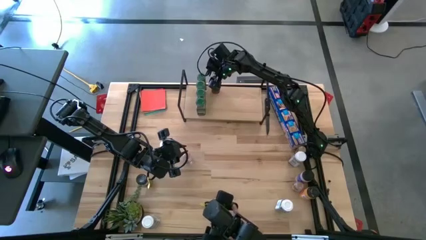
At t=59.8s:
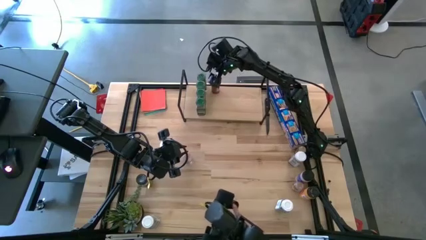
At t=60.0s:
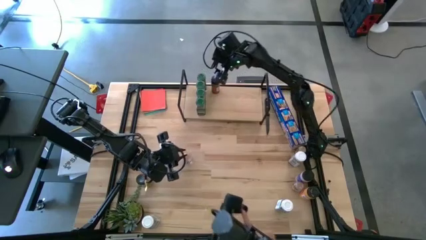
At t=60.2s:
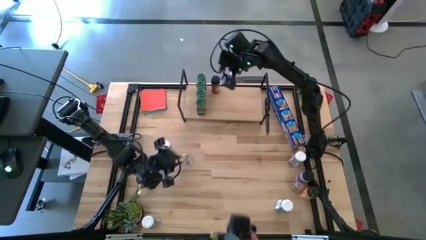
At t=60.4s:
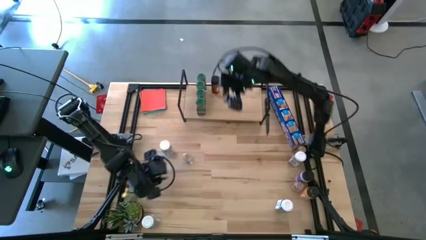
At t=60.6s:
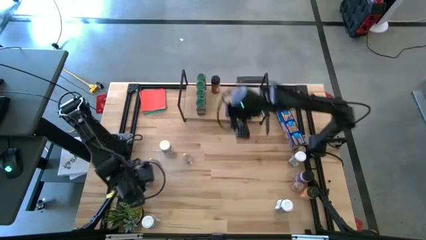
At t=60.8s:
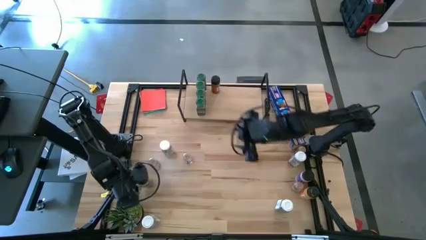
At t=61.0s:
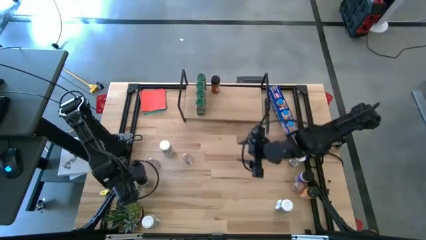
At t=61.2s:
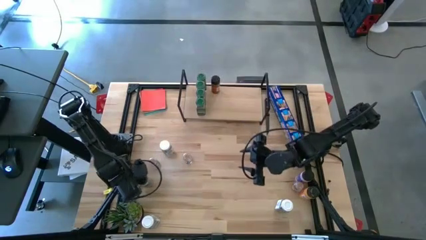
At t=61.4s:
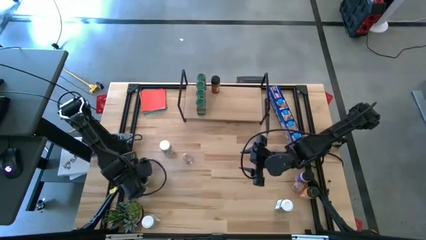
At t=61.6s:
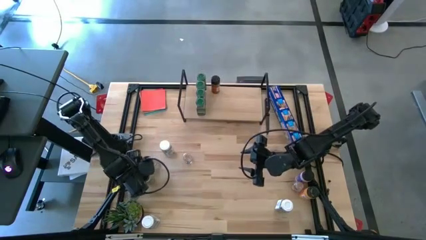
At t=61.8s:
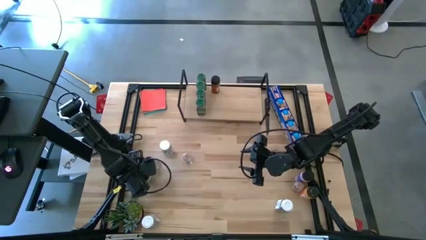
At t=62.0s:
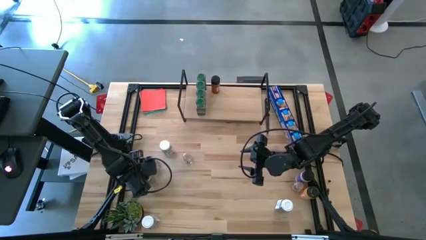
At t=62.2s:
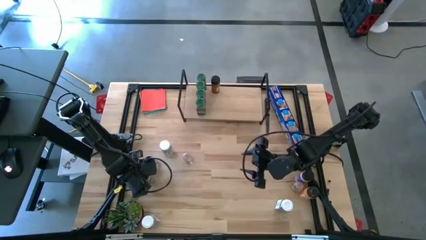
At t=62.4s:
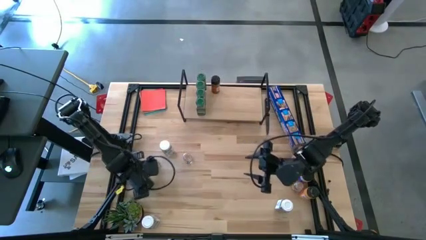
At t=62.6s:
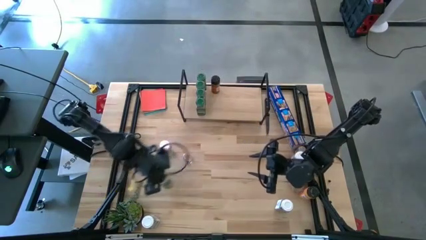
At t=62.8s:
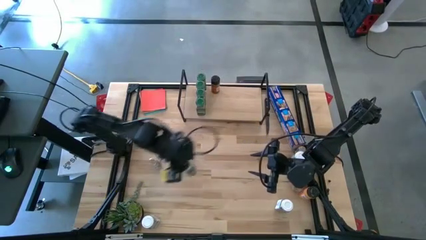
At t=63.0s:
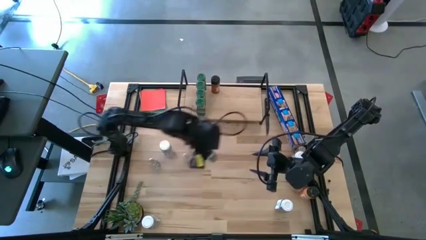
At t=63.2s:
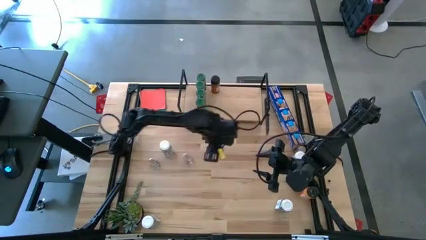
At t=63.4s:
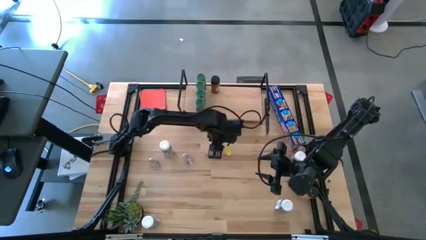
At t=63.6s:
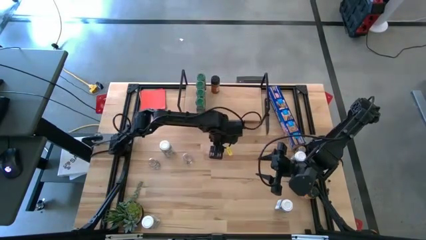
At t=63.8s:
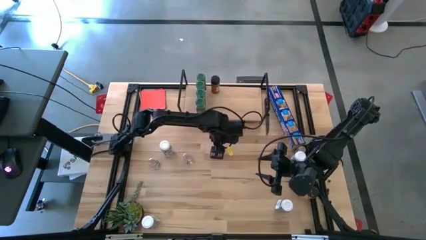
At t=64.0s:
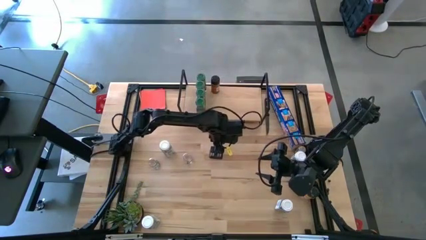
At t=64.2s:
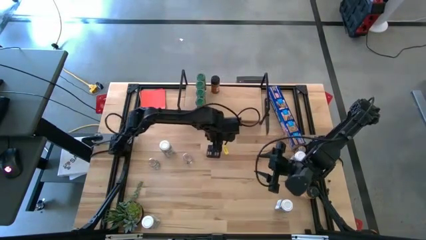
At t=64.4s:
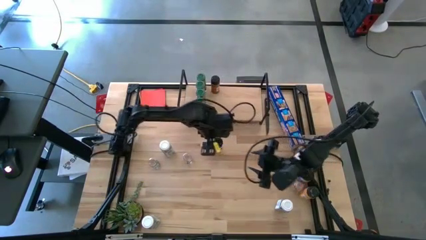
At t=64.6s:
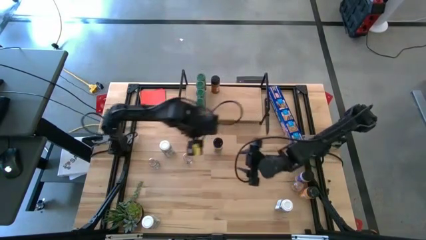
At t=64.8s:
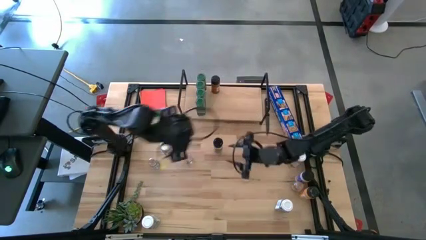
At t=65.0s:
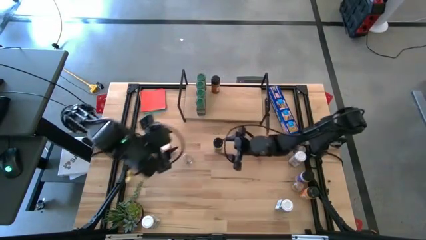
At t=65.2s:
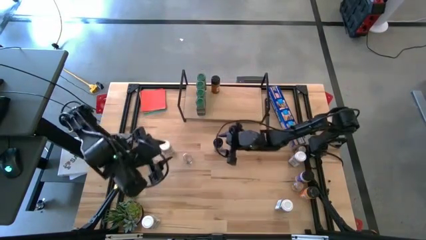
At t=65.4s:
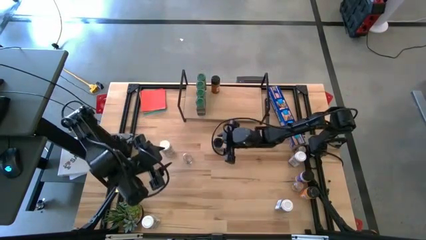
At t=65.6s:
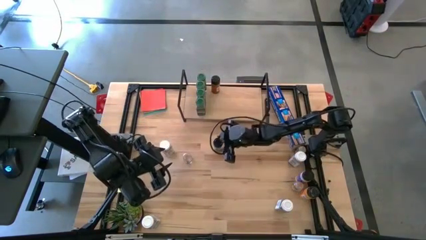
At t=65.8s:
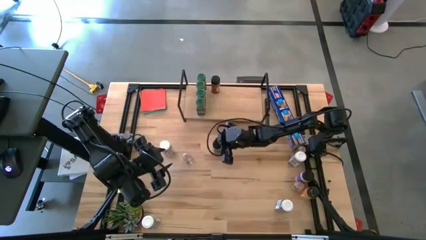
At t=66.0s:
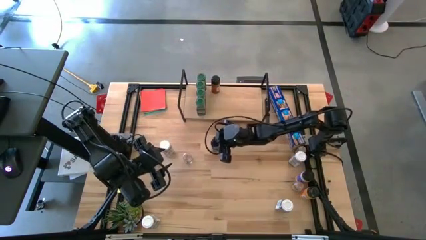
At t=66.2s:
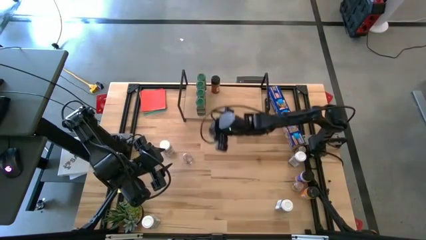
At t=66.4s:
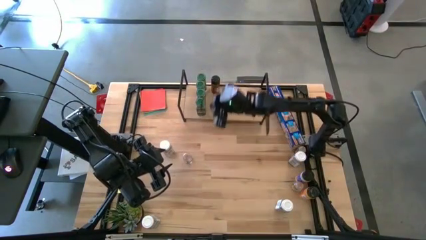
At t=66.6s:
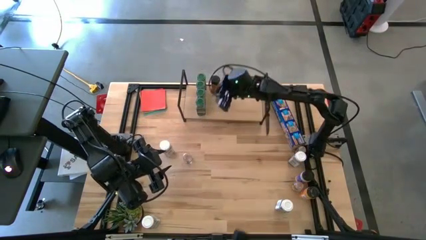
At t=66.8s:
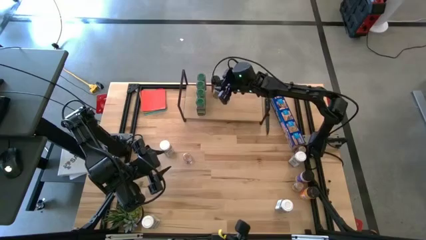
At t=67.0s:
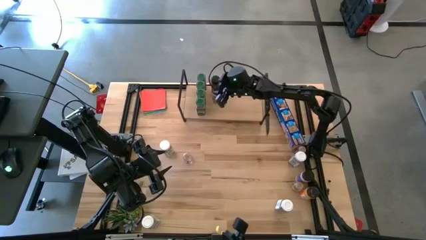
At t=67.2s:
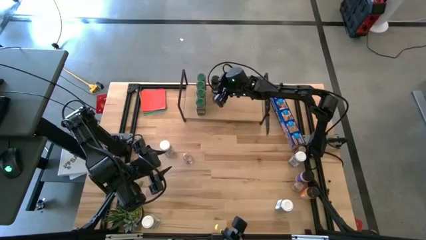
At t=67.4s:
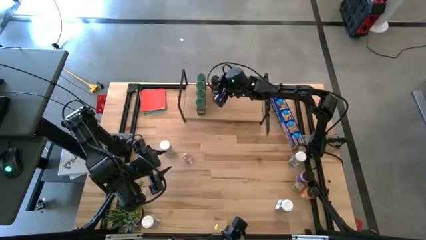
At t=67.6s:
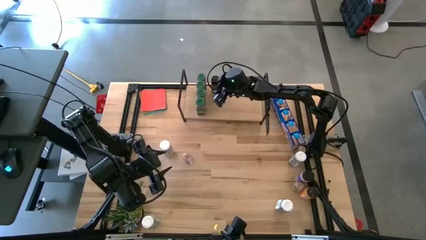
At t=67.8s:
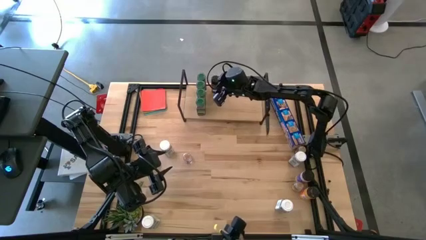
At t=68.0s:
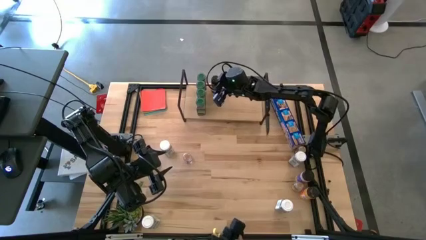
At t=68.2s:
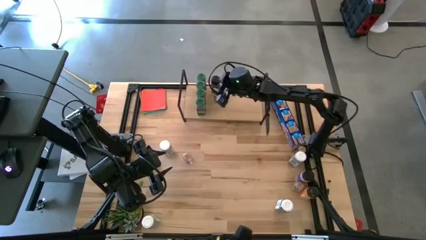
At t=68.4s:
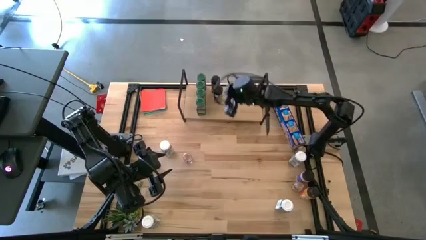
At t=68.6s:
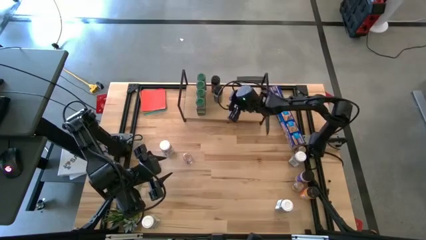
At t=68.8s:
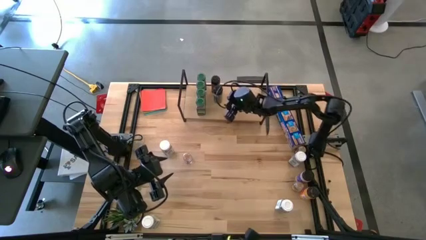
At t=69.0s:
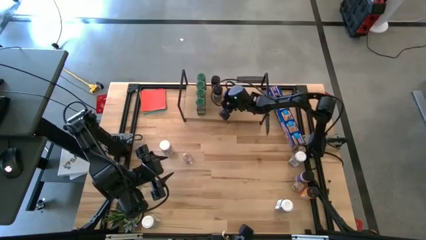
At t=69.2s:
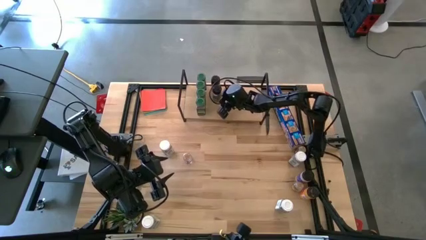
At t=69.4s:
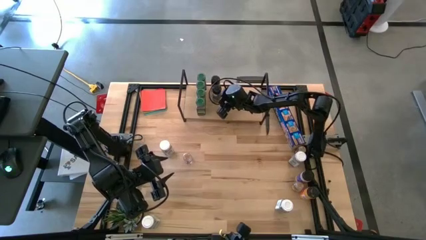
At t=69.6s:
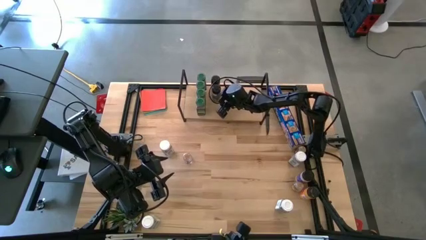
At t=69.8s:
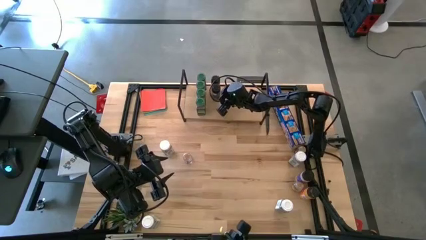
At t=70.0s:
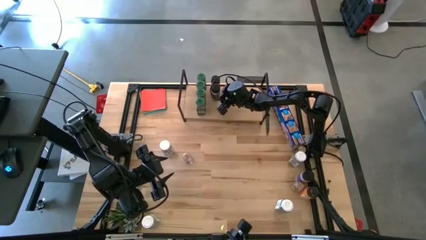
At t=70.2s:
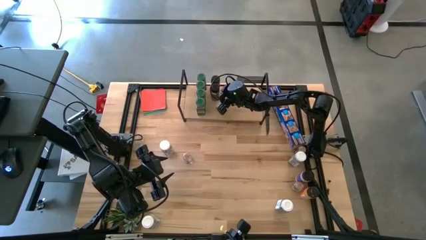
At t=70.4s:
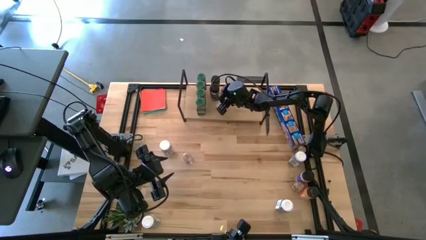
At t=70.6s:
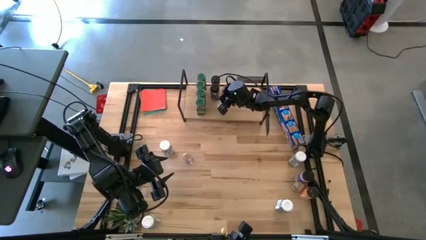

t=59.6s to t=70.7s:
Task: Shelf spices
Put the left black seasoning bottle on the shelf aligned with the other black seasoning bottle

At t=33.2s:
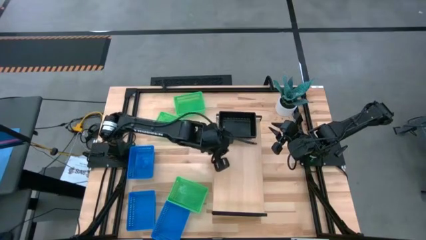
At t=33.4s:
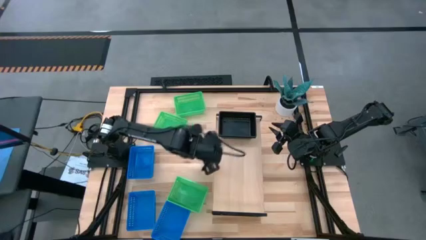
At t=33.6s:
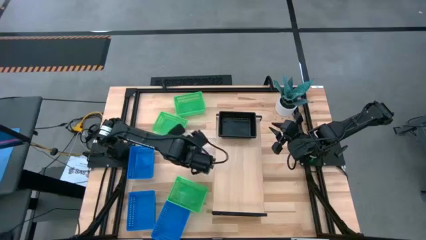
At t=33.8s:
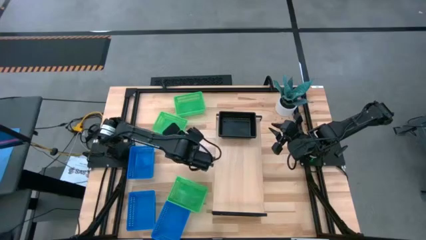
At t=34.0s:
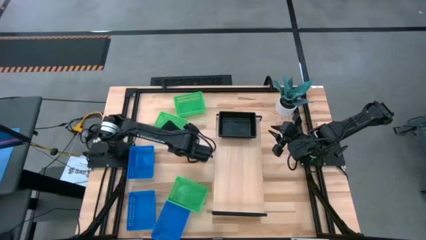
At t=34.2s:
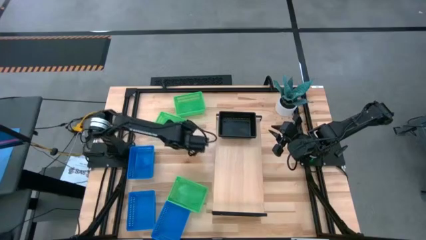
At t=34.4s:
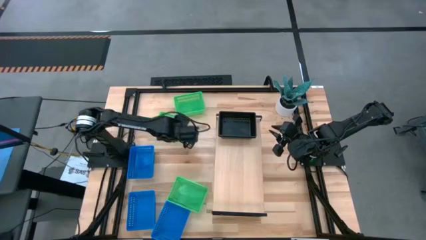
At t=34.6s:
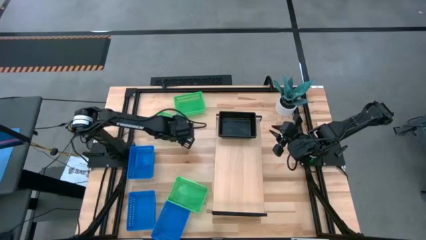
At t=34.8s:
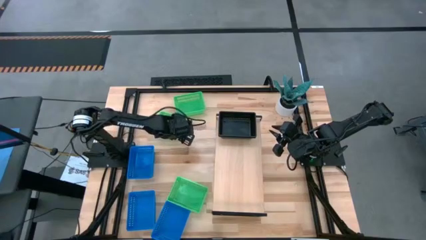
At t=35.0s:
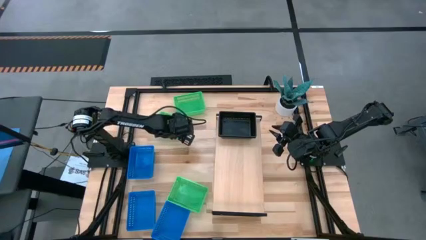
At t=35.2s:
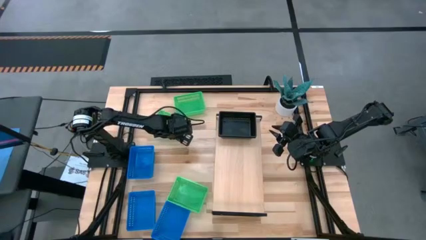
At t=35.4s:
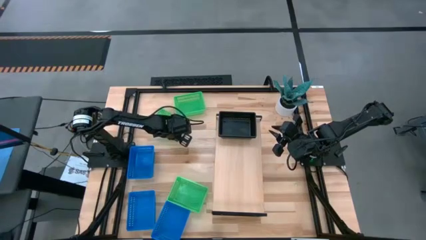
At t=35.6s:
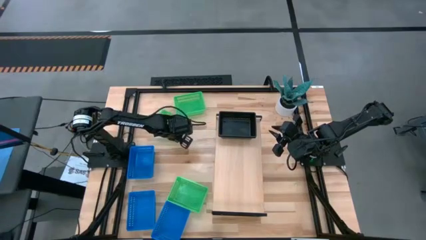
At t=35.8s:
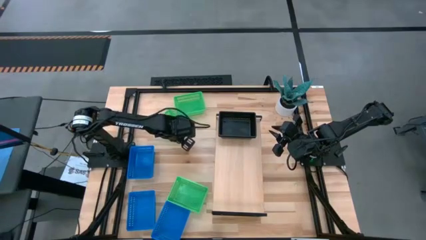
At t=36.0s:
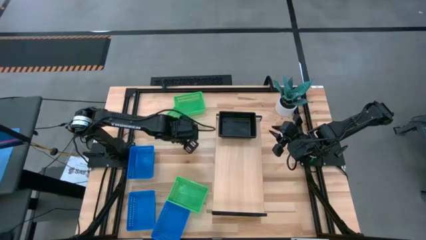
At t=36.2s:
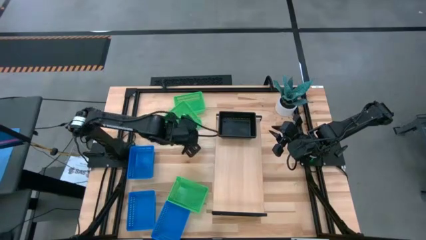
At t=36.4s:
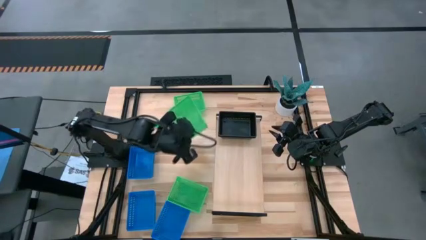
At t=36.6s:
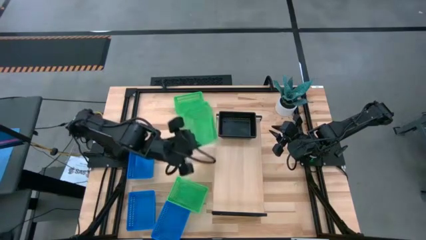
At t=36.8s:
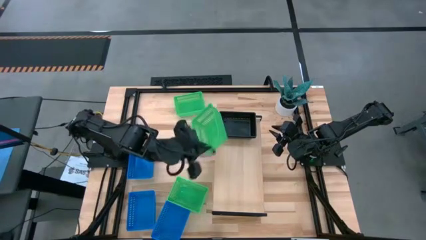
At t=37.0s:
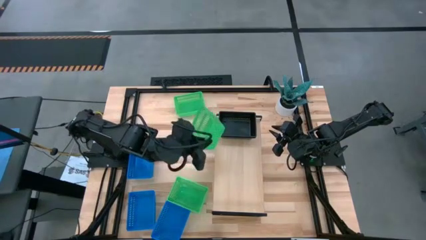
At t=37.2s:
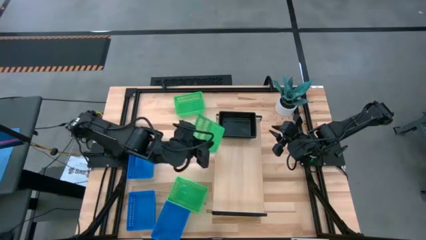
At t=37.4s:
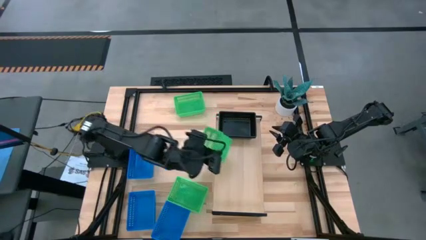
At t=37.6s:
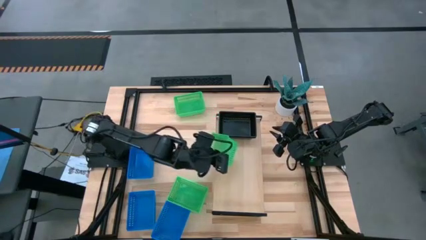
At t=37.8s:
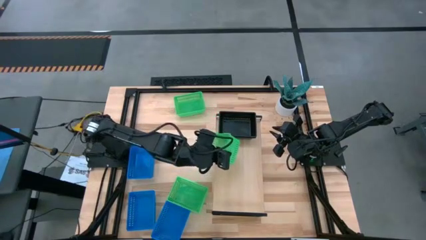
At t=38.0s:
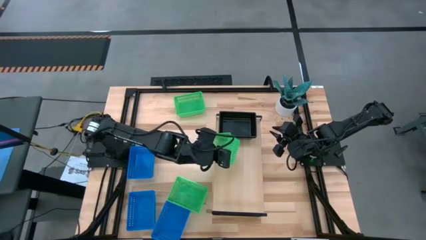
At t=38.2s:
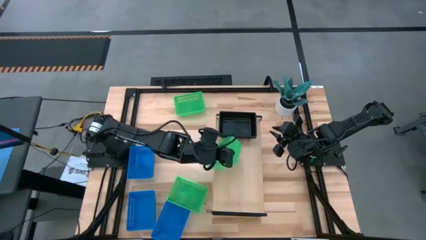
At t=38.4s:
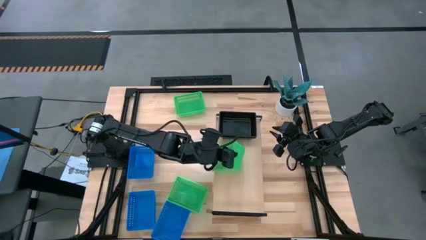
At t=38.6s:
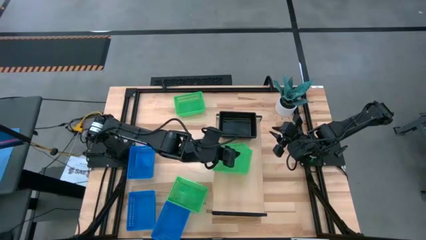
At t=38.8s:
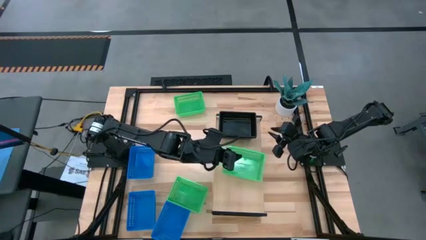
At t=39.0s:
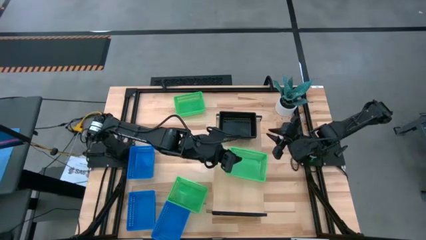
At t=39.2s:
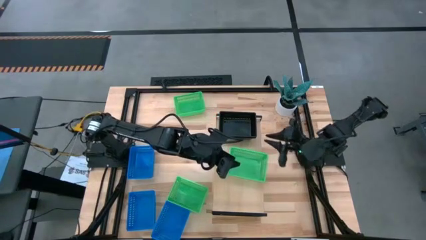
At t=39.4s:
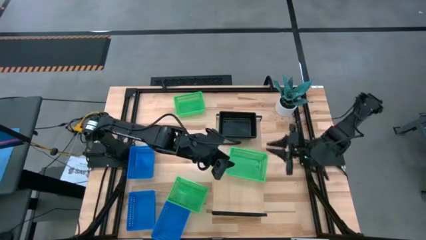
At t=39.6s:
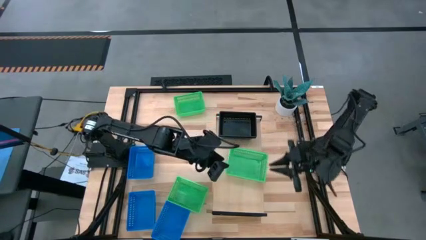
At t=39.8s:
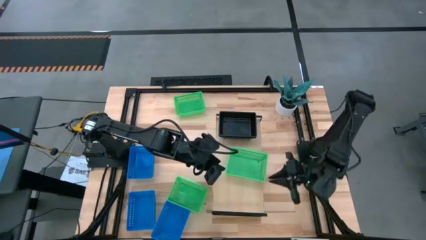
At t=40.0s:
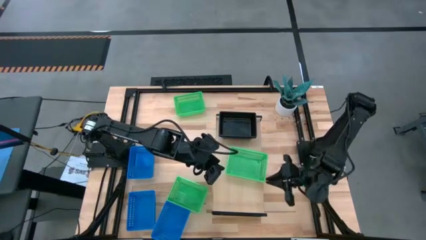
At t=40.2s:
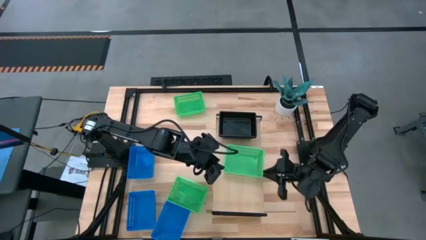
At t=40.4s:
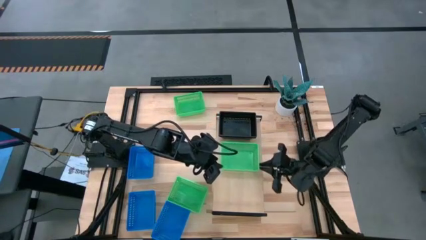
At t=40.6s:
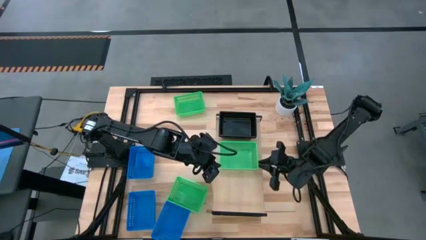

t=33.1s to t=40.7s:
Task: Stack baskets on shelf by color
Put the middle green bin on the shelf
